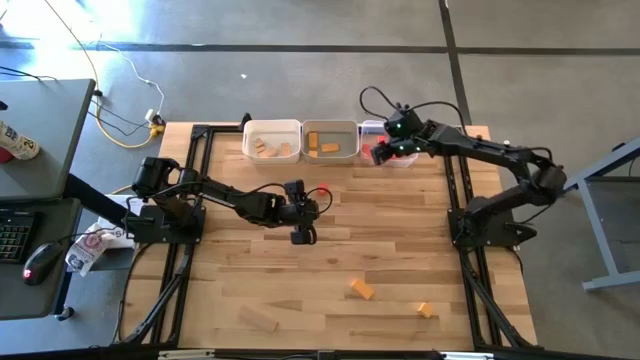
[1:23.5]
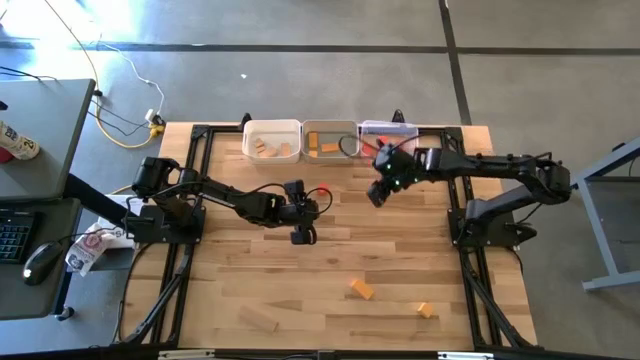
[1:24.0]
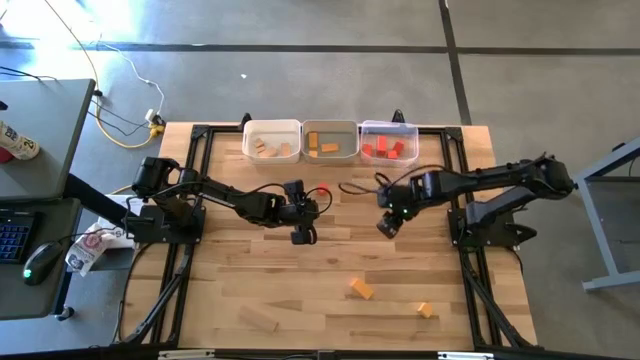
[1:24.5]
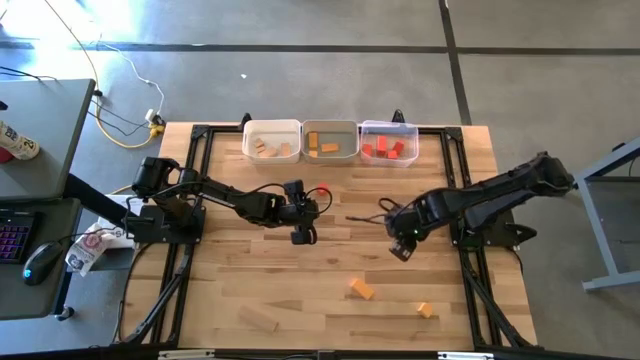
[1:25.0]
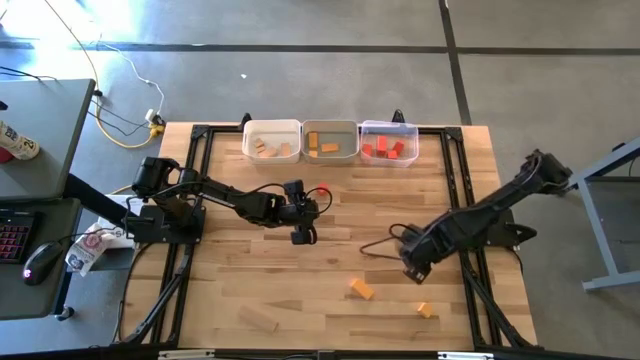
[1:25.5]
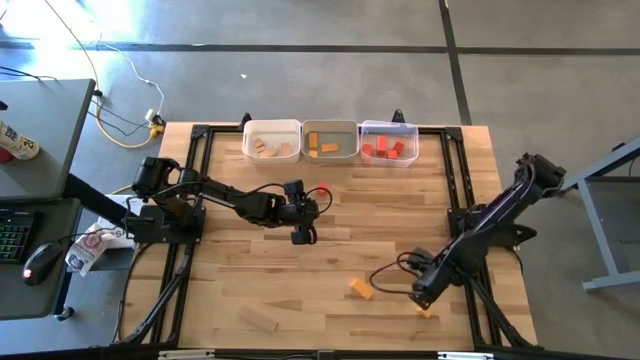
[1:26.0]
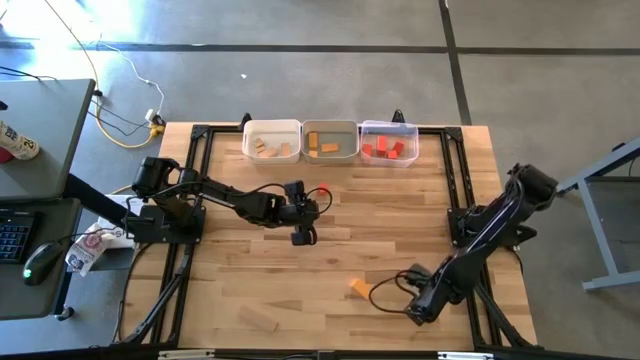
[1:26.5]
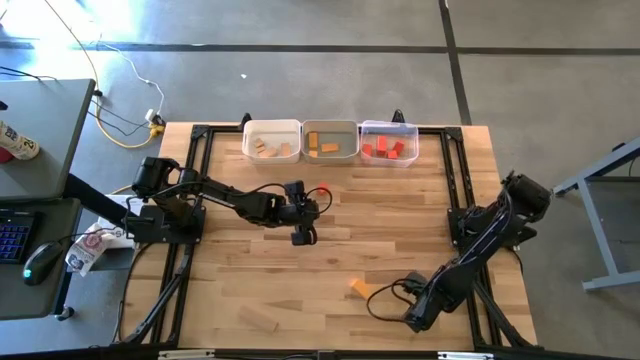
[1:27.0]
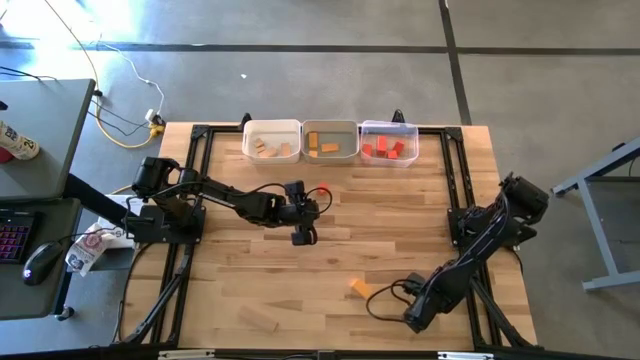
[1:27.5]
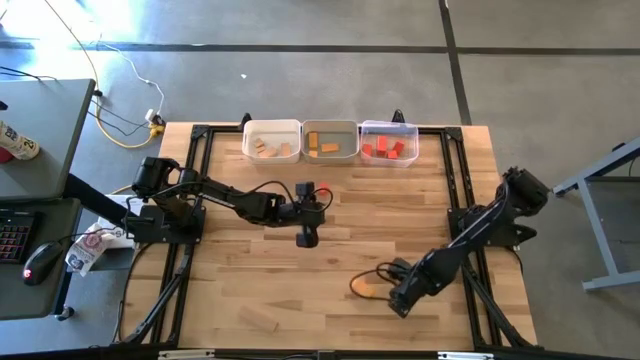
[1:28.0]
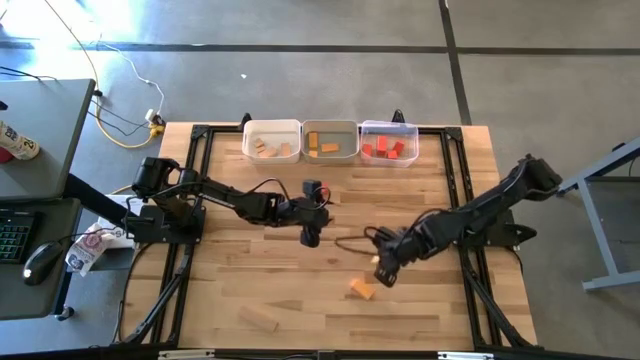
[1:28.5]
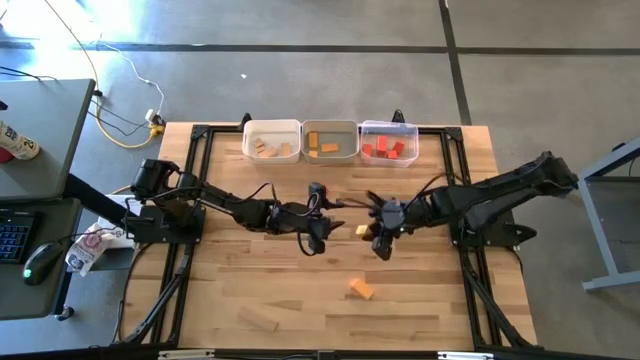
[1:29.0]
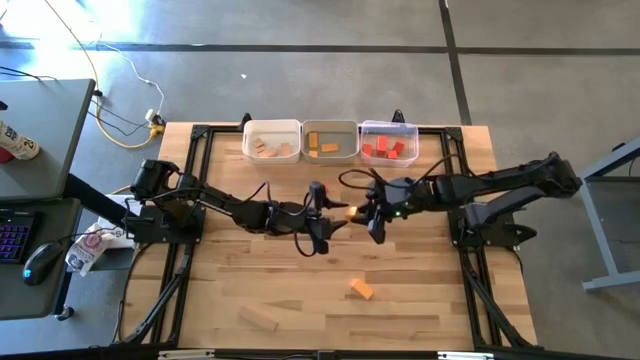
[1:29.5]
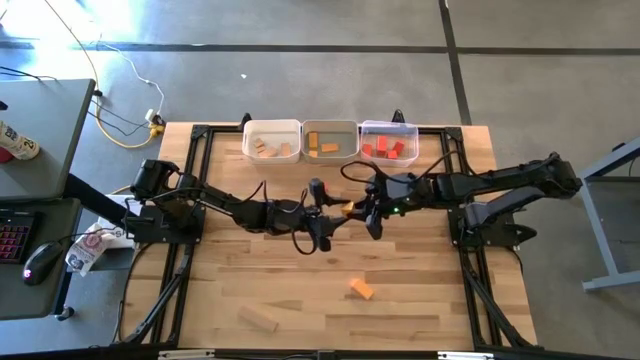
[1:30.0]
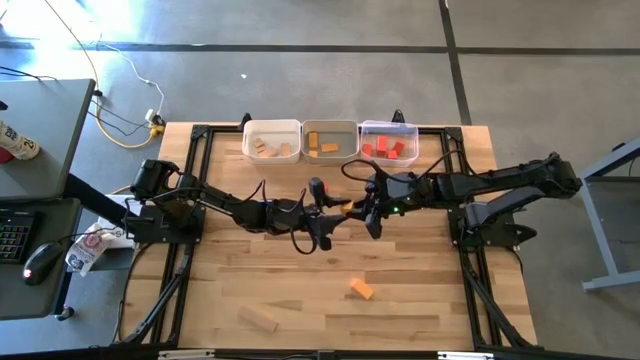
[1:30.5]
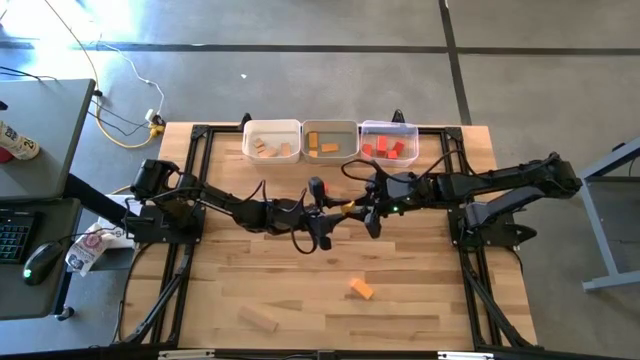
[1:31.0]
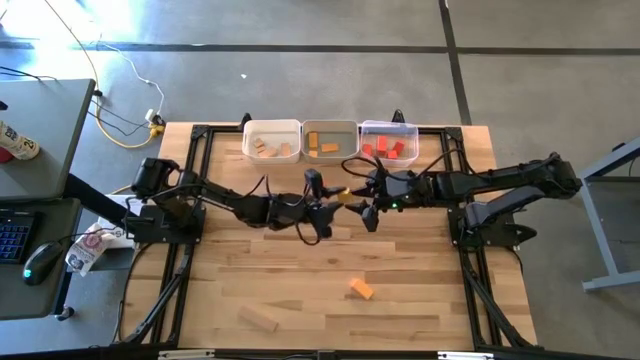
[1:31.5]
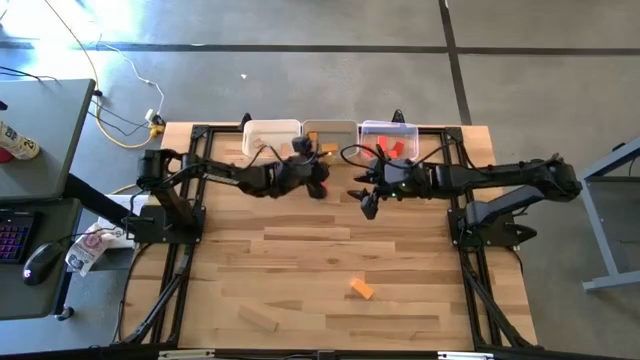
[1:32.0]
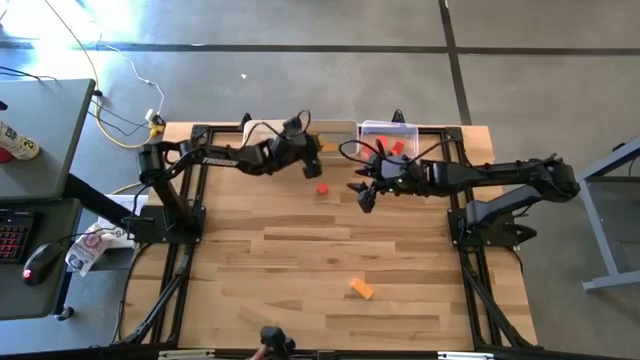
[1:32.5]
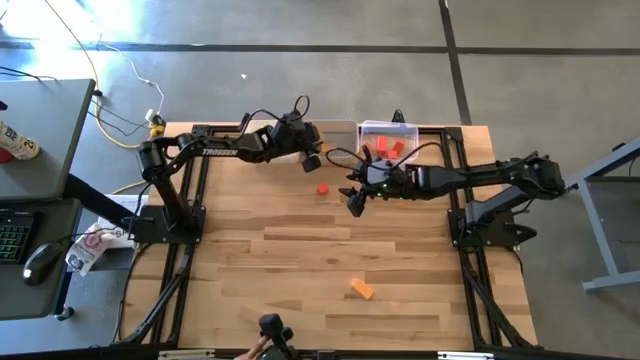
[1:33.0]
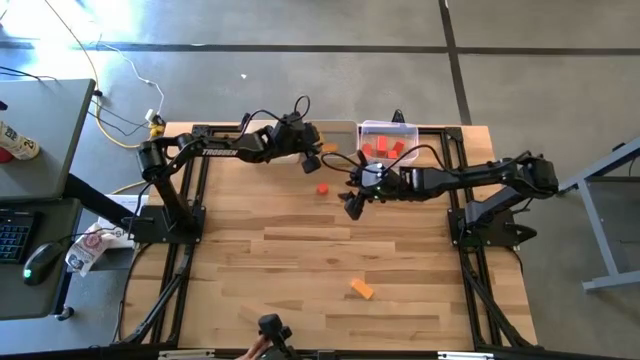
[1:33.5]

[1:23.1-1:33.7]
Task: Sort & place blocks by color
Put the yellow block into the gray bin

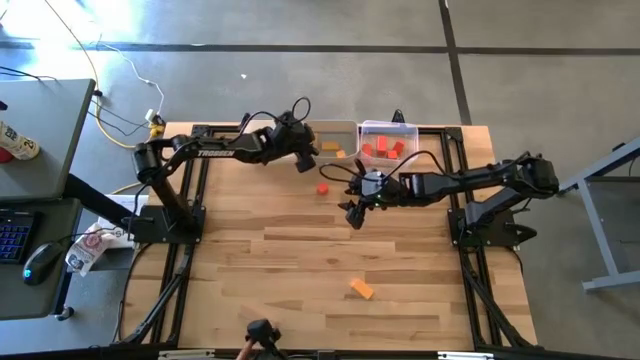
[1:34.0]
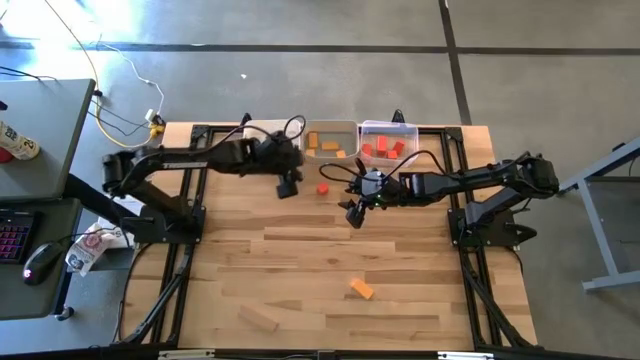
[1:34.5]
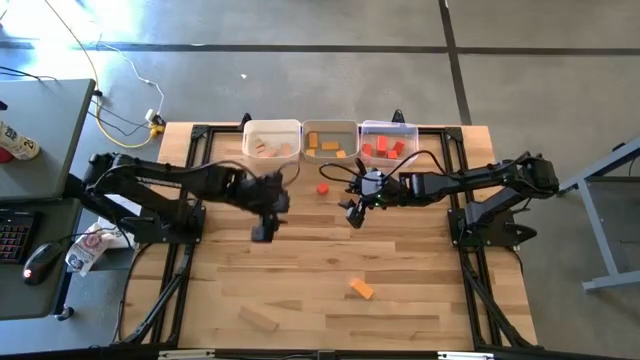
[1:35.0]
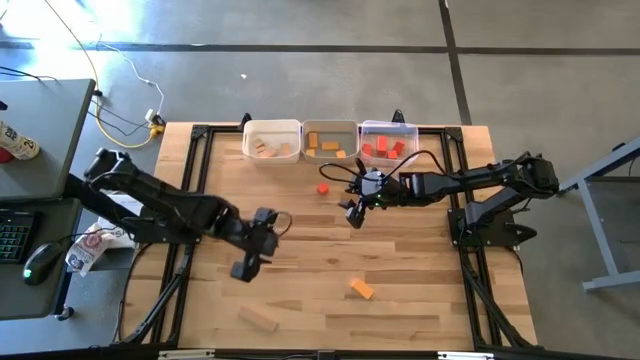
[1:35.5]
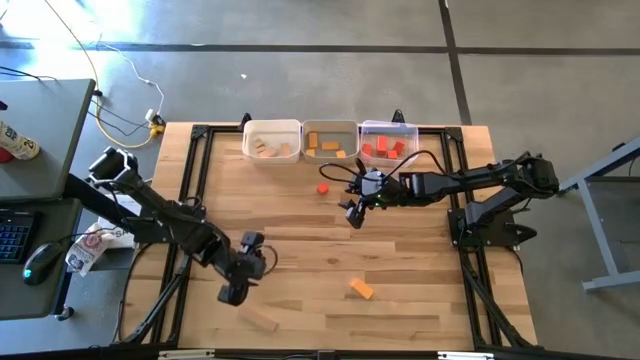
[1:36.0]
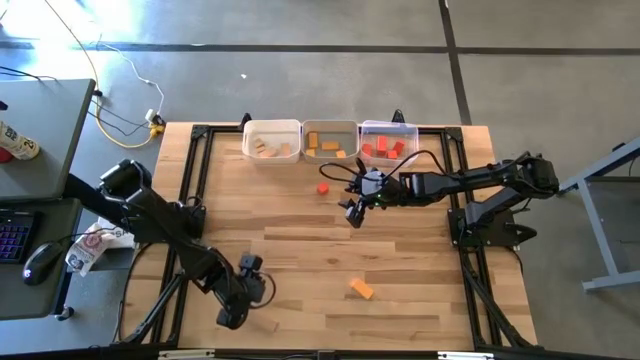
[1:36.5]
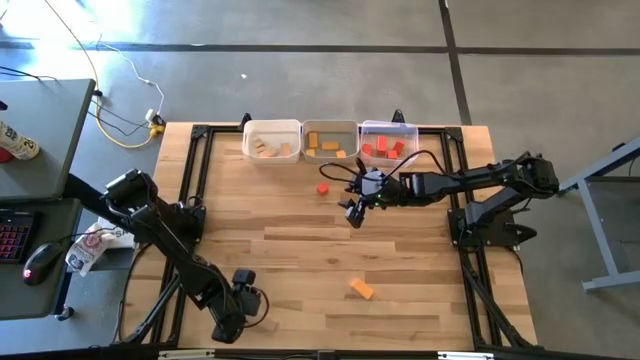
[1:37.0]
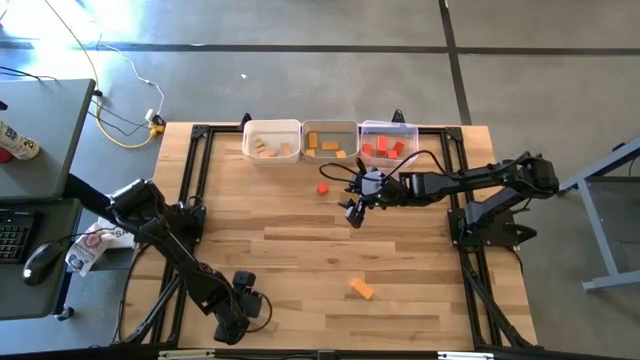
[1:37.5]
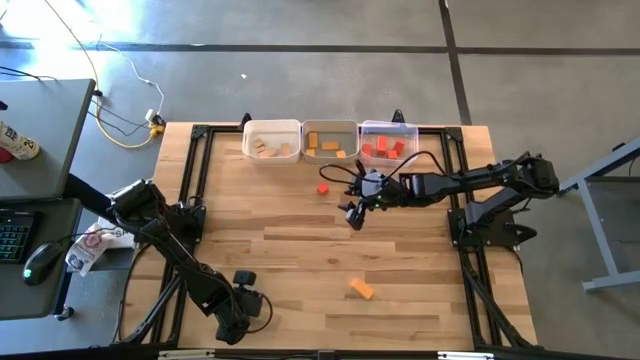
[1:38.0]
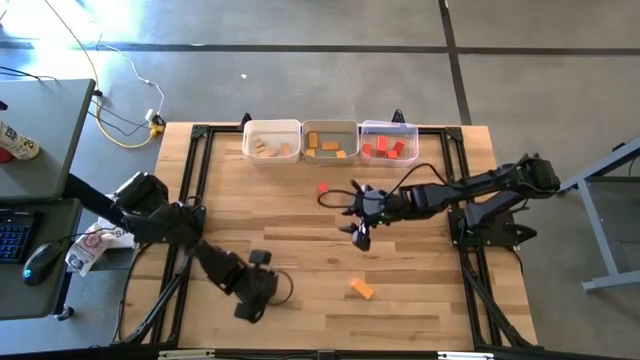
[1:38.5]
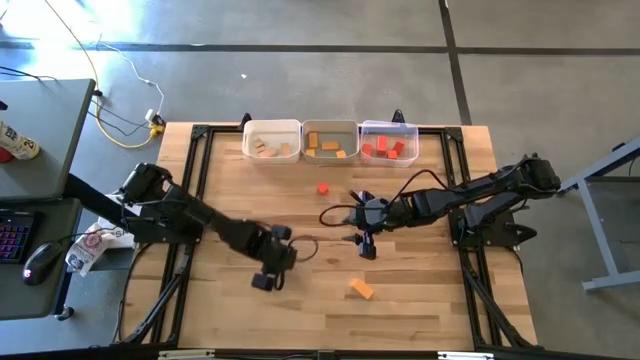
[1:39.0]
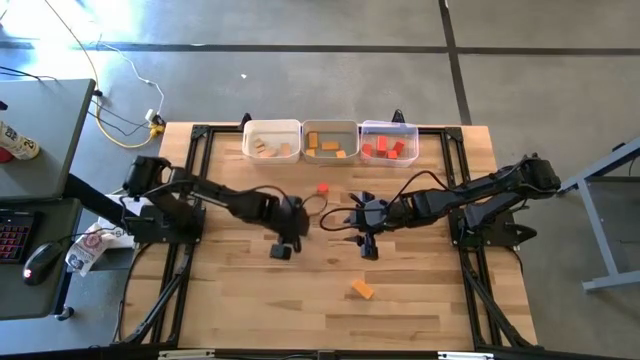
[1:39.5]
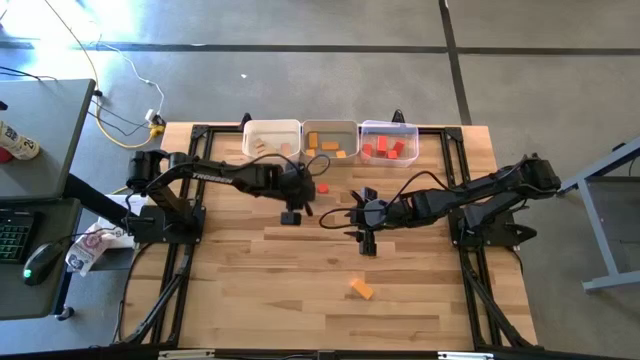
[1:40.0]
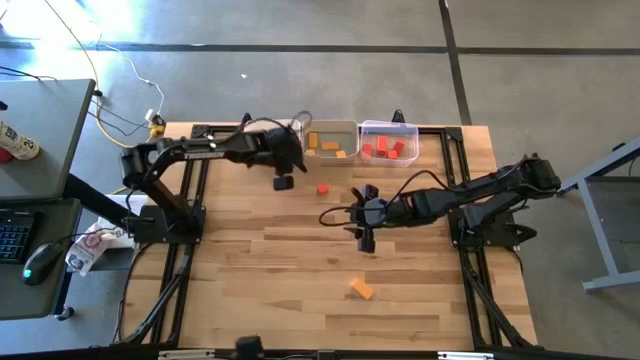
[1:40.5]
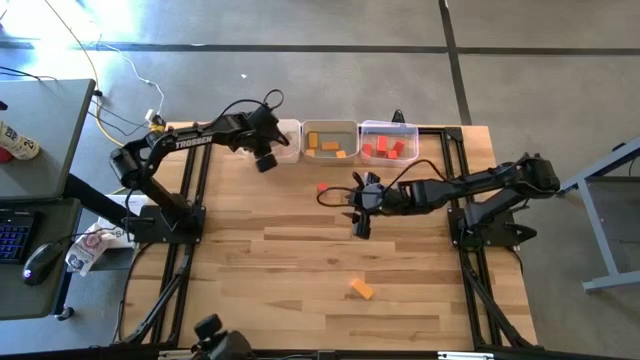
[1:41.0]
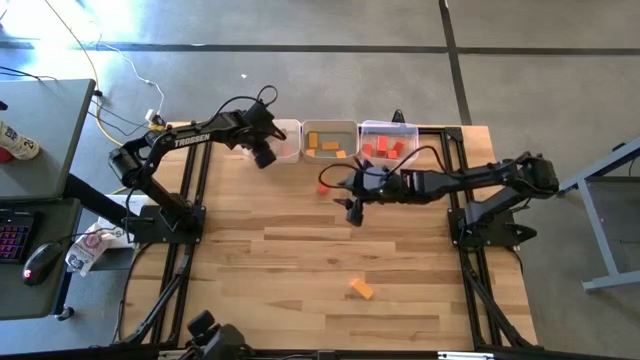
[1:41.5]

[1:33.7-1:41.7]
Put the brown block into the white bin

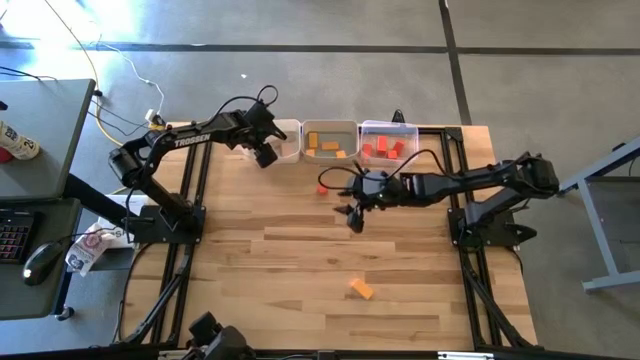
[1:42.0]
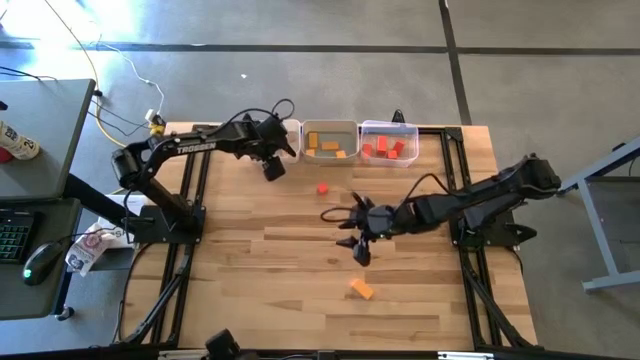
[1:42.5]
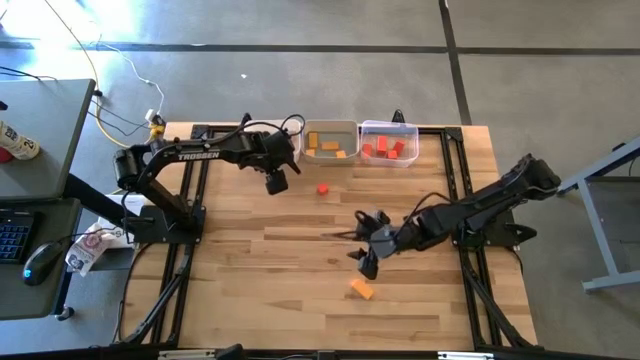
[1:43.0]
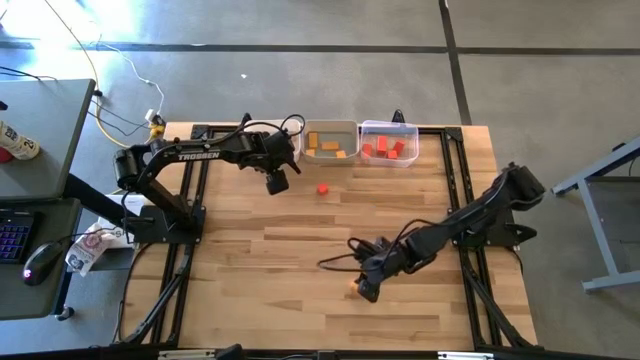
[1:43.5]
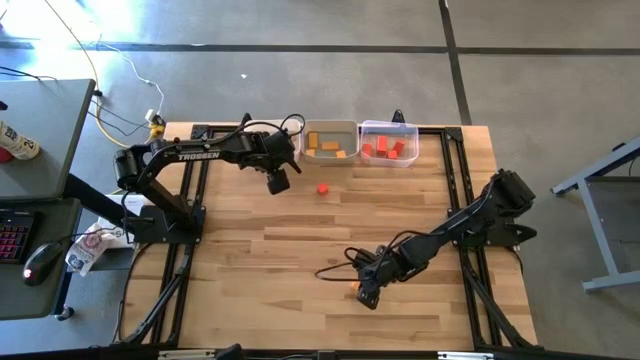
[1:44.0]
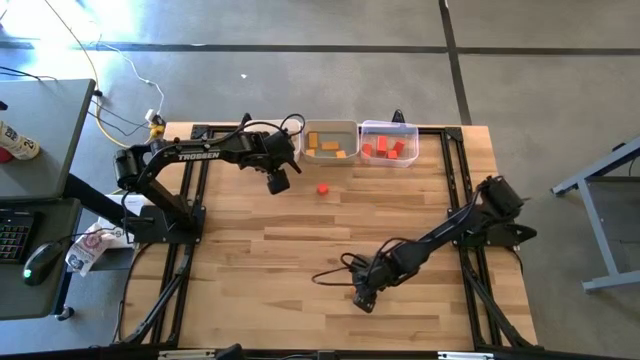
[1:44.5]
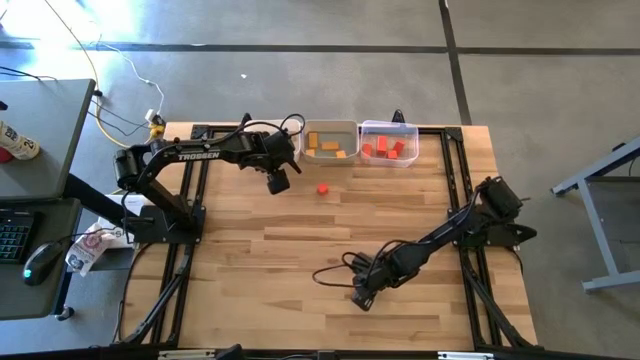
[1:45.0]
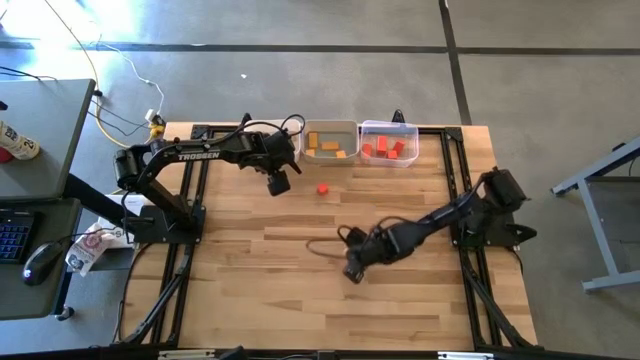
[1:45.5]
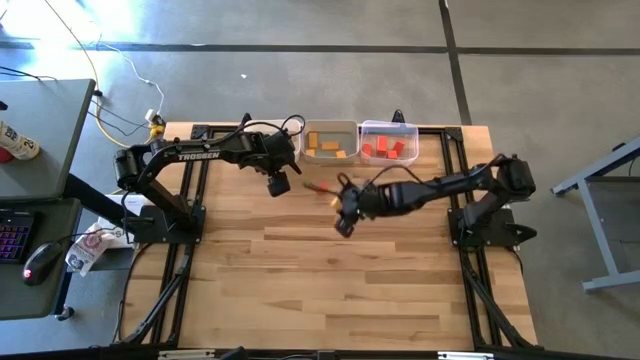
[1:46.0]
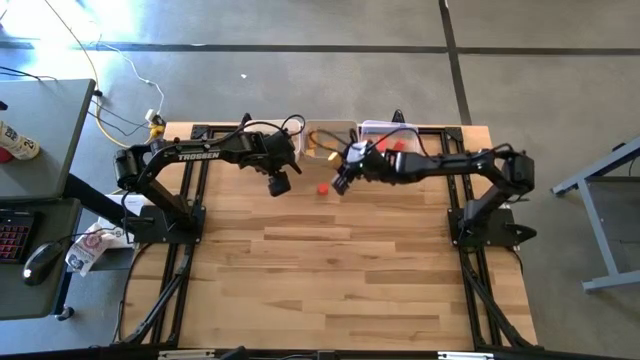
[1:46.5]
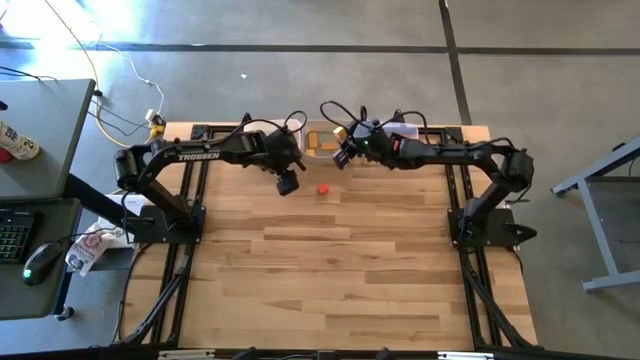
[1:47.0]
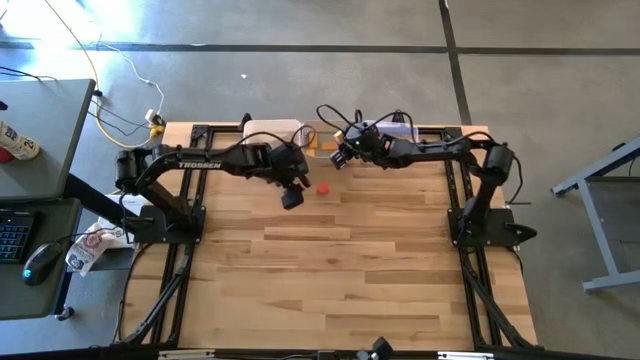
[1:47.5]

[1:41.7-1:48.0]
Put the yellow block into the gray bin
